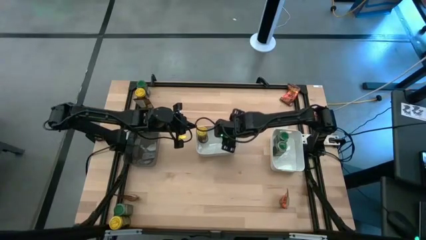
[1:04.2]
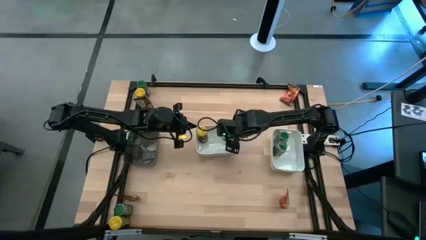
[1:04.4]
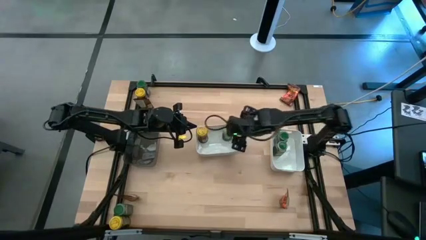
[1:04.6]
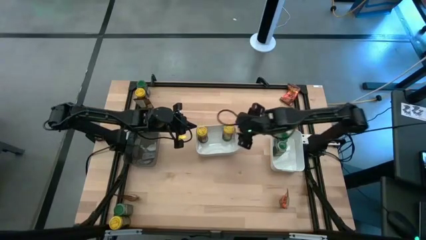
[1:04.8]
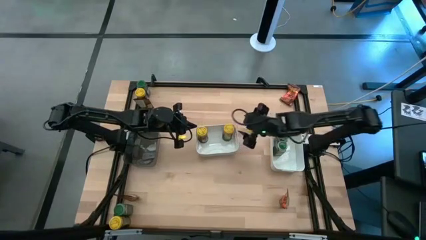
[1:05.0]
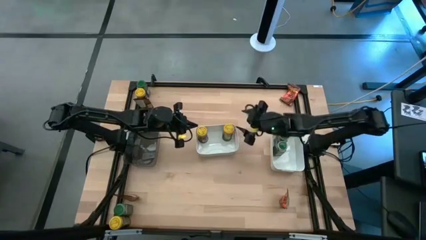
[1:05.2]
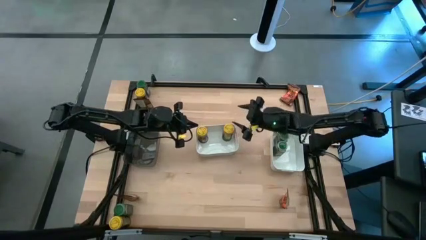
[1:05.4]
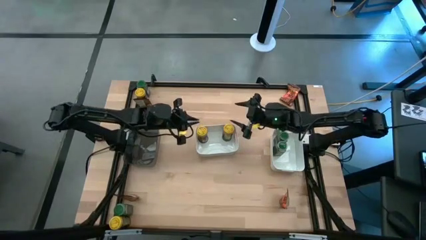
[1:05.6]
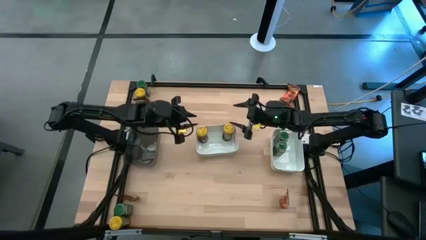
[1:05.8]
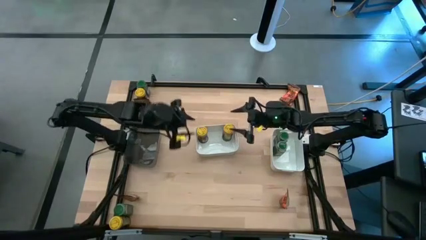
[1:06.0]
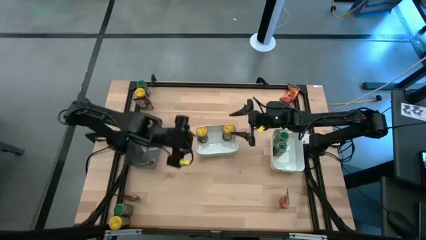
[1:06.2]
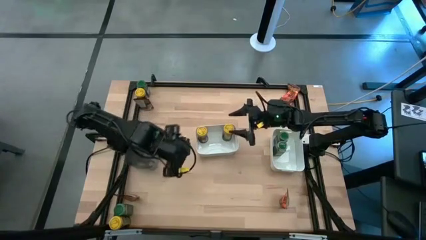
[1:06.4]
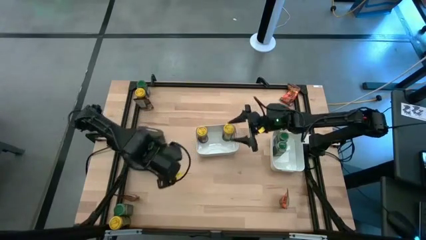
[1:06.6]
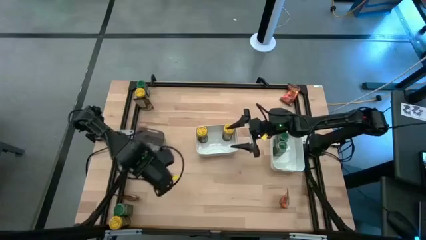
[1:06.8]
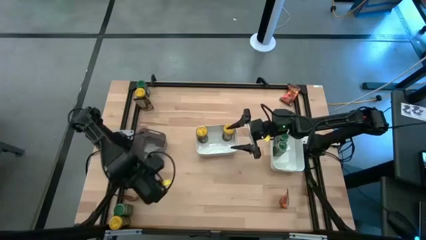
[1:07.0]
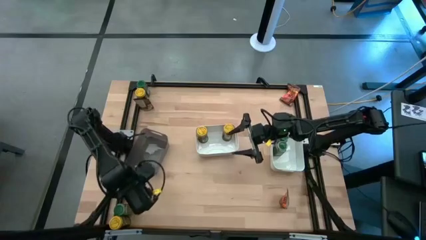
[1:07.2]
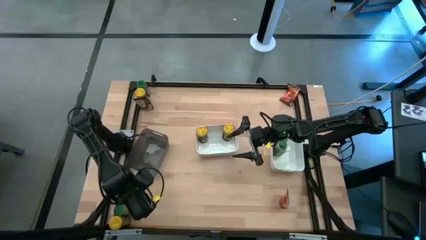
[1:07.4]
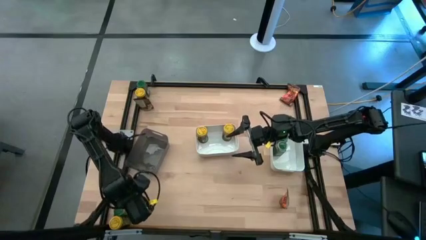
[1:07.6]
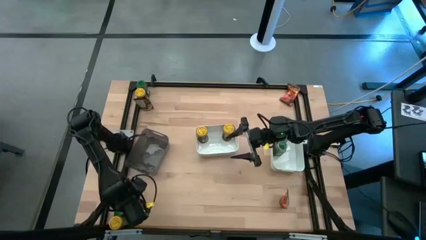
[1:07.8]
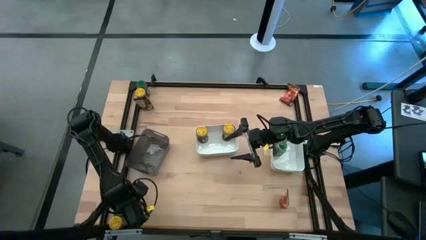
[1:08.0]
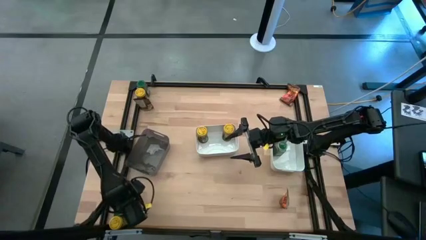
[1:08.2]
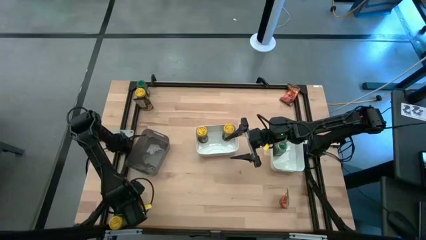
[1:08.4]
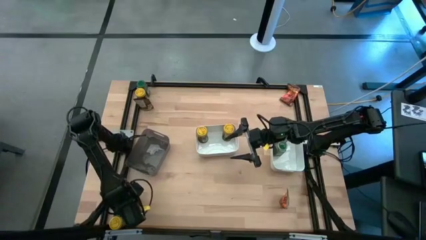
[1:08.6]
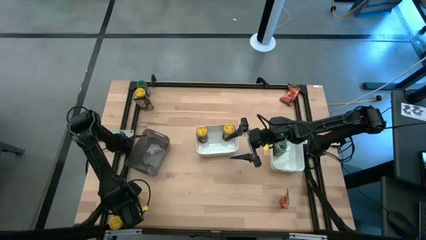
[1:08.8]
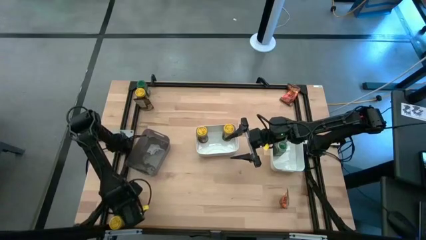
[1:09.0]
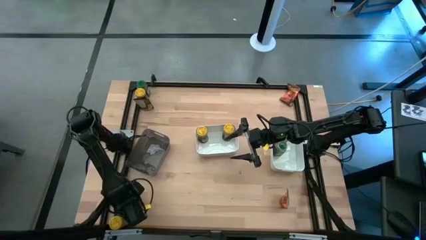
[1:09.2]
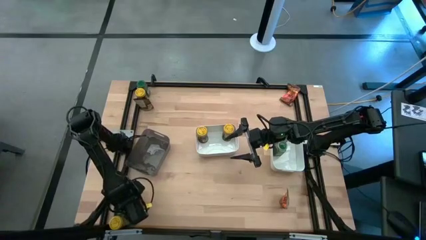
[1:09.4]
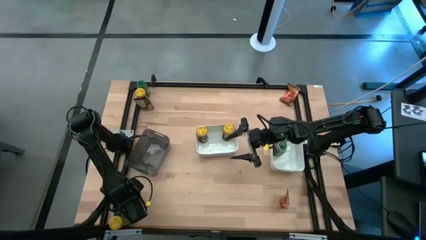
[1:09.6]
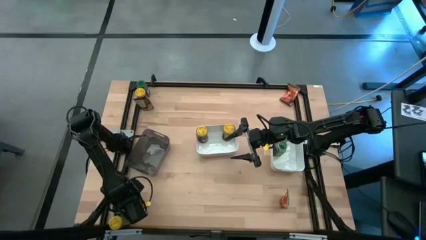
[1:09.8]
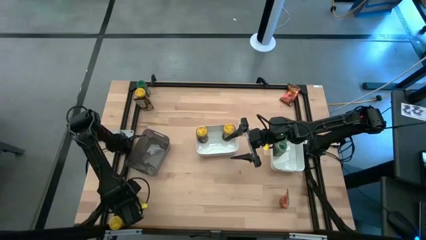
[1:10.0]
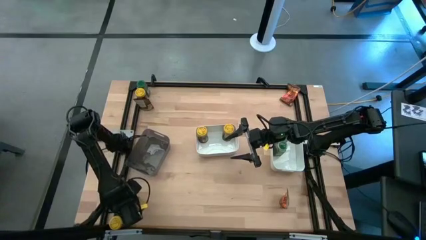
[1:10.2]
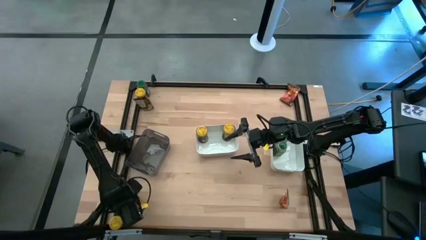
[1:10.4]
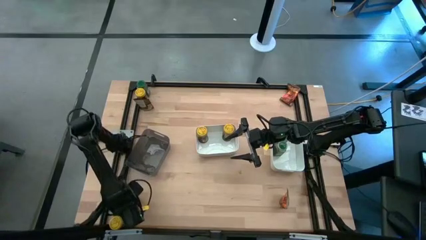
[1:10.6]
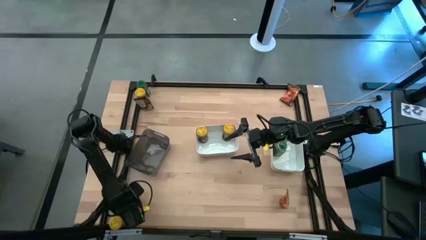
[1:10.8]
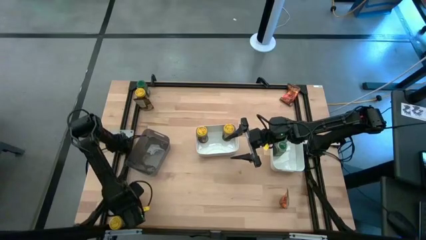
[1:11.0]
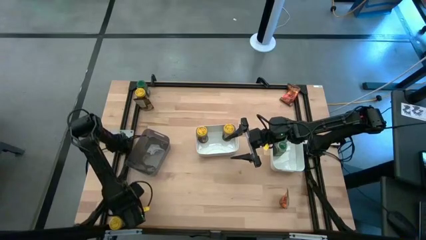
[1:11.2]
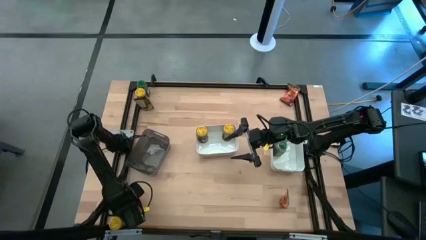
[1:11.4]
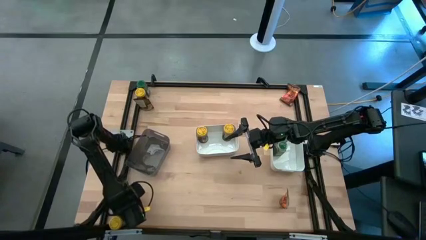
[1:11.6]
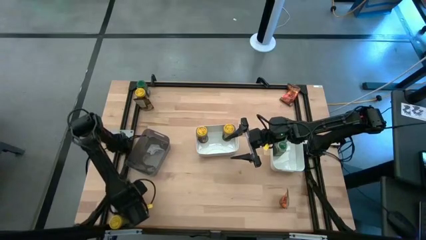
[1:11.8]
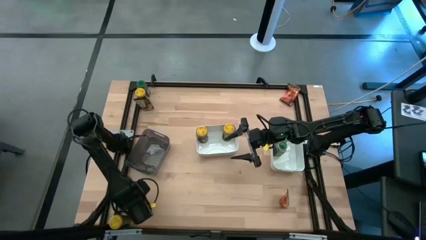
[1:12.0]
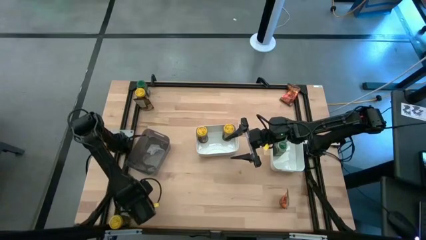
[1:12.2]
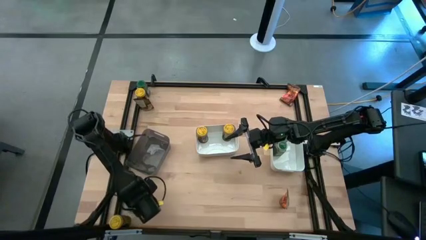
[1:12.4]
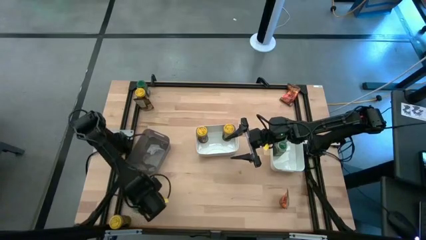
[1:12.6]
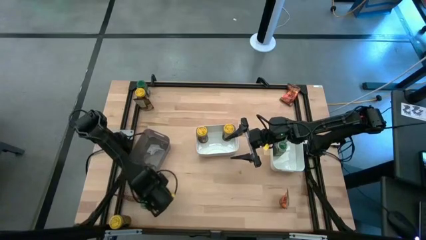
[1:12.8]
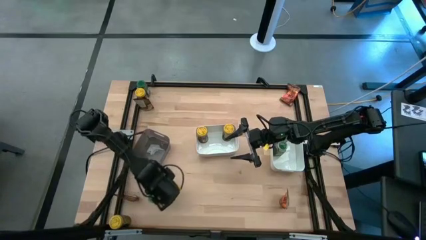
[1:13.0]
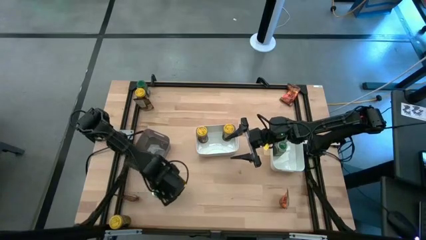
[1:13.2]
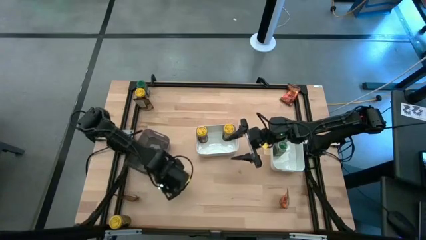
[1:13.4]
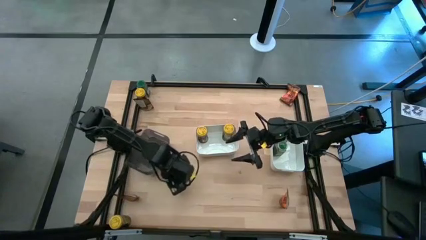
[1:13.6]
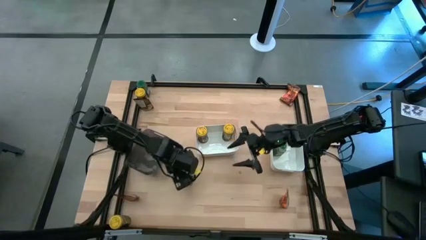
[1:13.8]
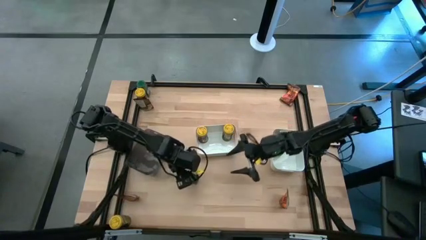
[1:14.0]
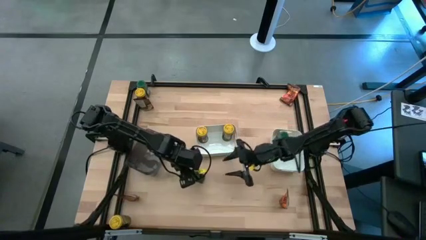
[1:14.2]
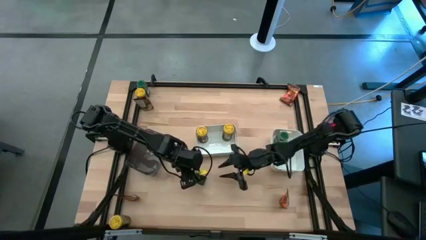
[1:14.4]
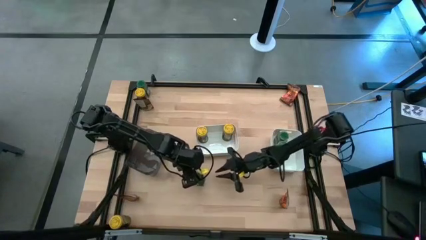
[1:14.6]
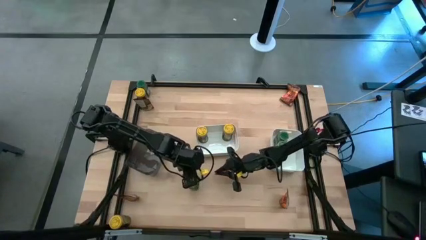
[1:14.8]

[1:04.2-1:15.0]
Task: Sort spices by type
Put the bottom green seasoning bottle into the right white bin

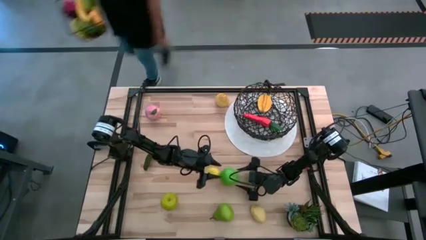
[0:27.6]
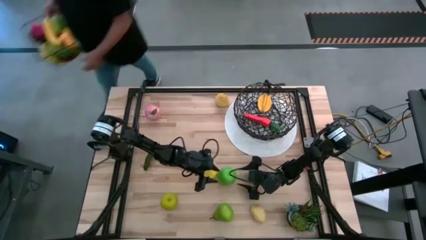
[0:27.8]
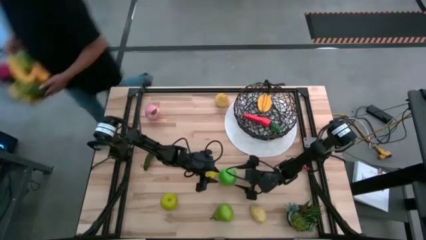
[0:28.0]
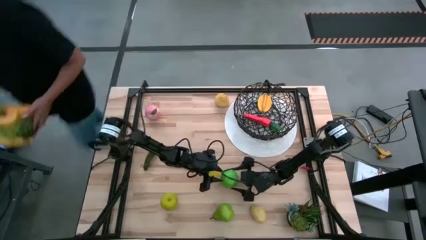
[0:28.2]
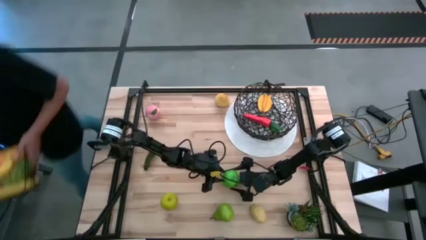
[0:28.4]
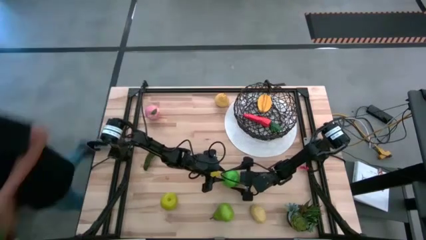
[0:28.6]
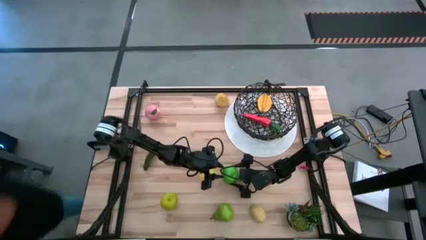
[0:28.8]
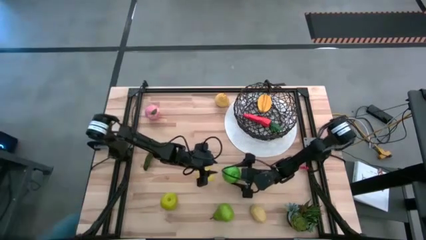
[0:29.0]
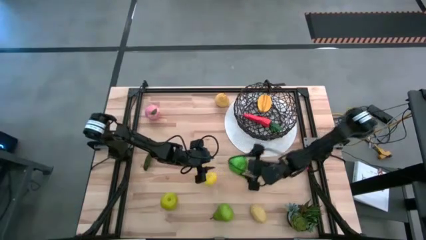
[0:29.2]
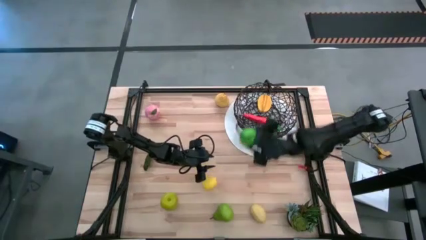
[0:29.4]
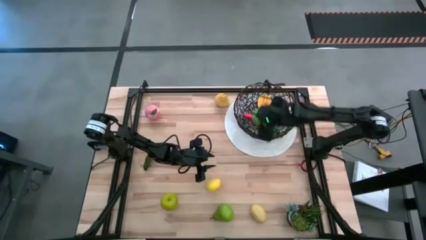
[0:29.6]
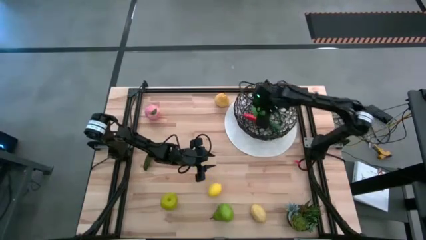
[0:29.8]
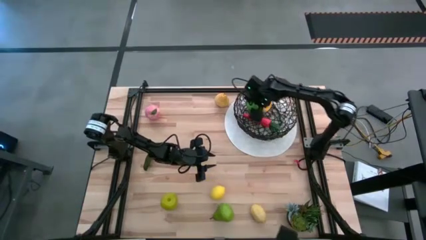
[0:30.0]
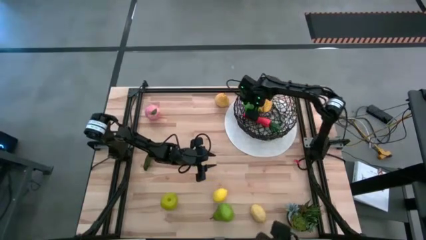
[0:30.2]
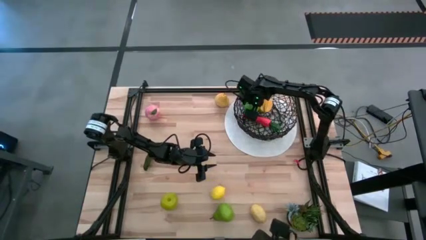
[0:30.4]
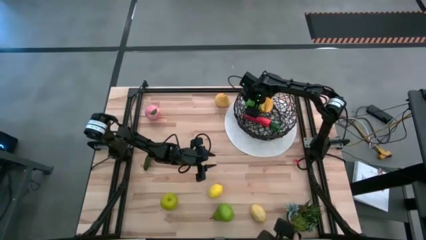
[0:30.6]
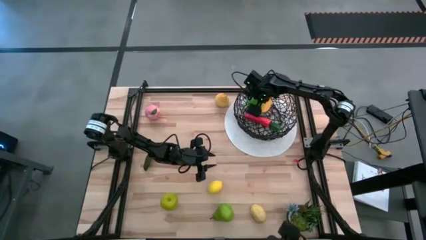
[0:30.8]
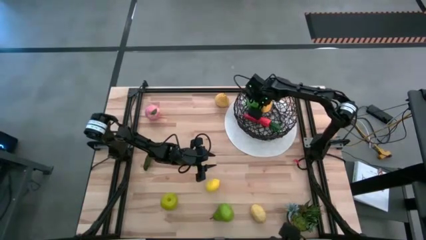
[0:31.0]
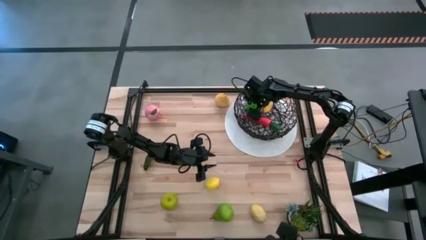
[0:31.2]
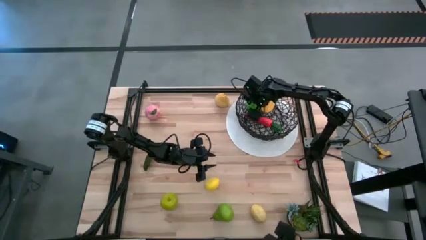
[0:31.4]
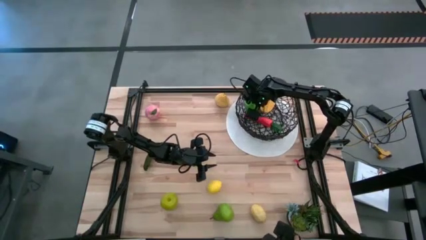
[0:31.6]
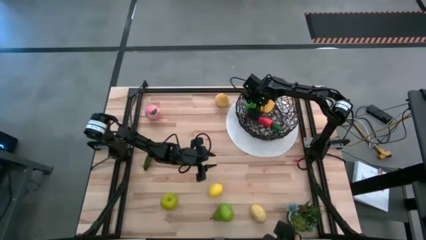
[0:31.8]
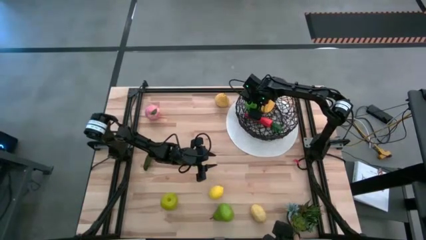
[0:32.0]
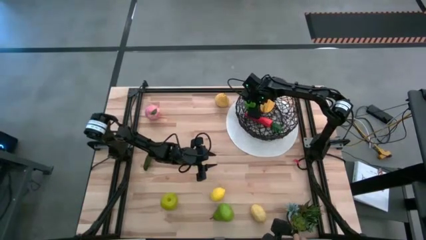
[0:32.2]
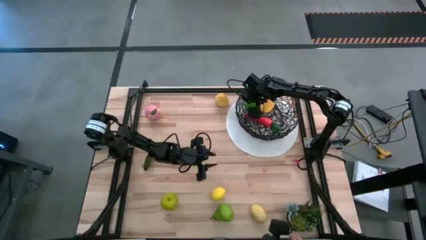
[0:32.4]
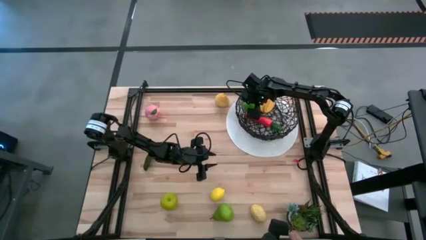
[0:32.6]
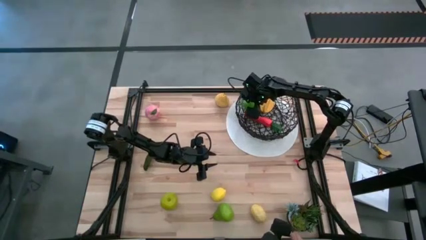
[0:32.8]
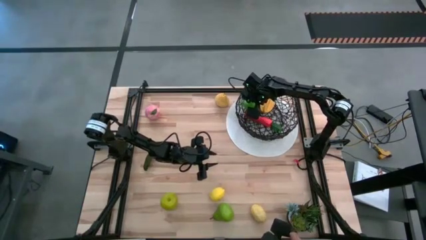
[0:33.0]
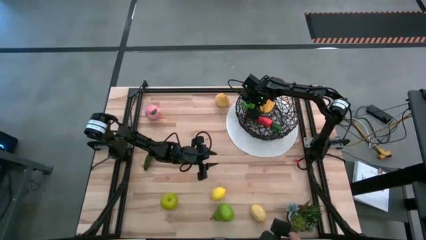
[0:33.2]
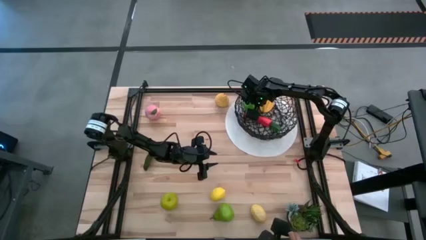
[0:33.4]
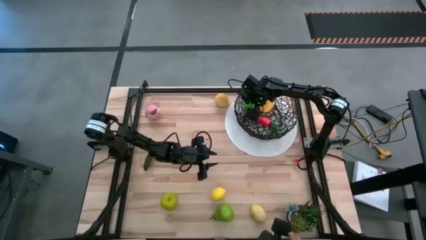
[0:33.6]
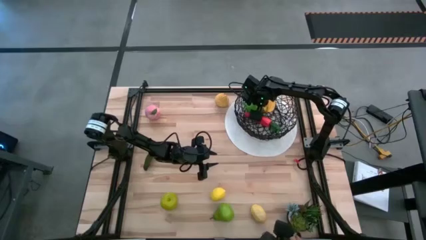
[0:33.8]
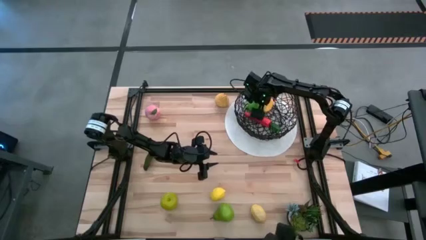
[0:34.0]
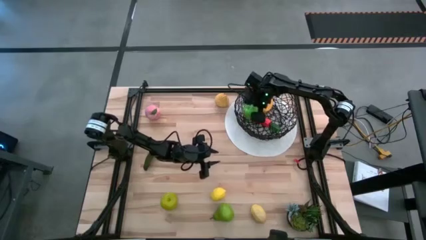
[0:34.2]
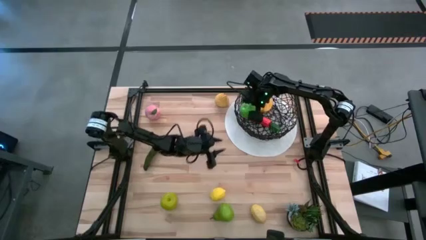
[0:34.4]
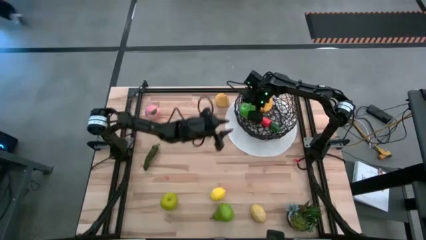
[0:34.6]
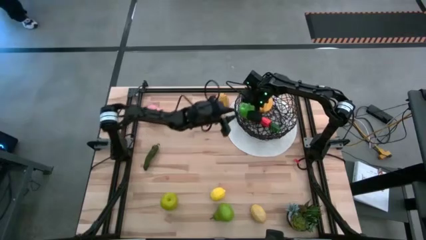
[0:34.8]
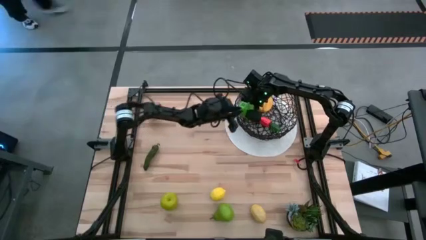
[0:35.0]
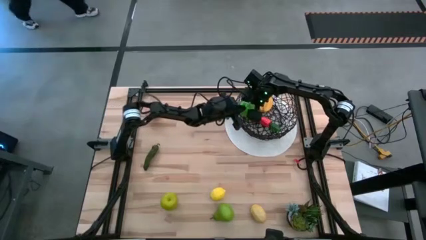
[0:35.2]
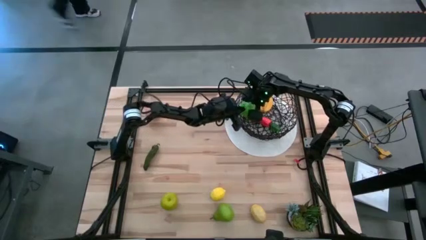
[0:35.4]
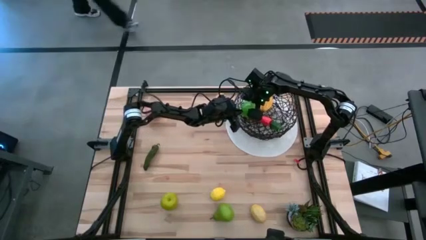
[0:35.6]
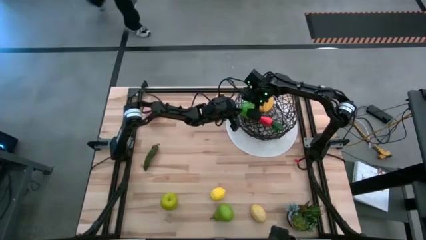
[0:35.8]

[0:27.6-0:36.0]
Task: Build produce basket
Put the green apple into the black wire basket
